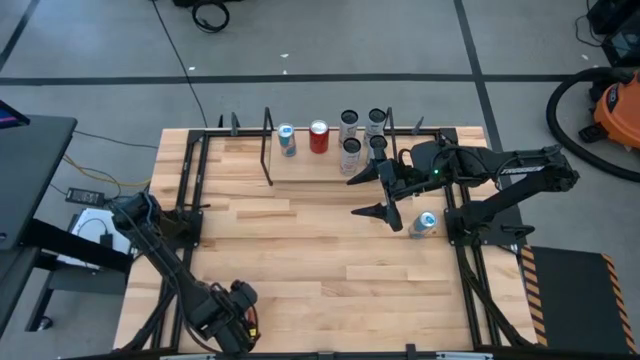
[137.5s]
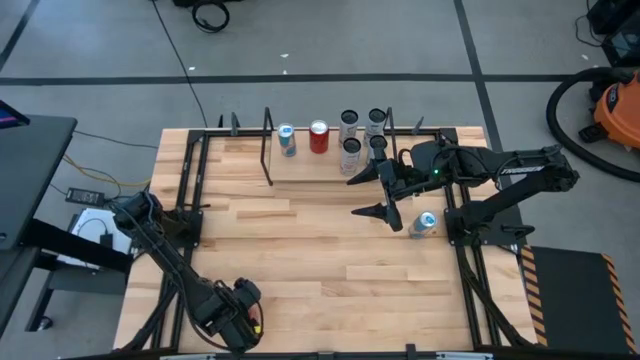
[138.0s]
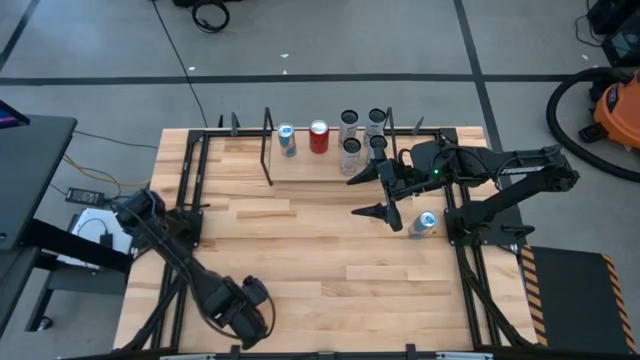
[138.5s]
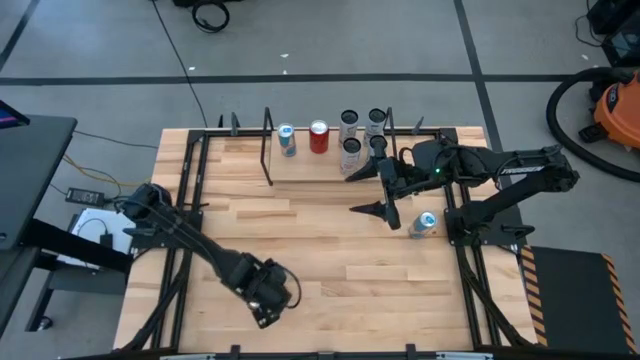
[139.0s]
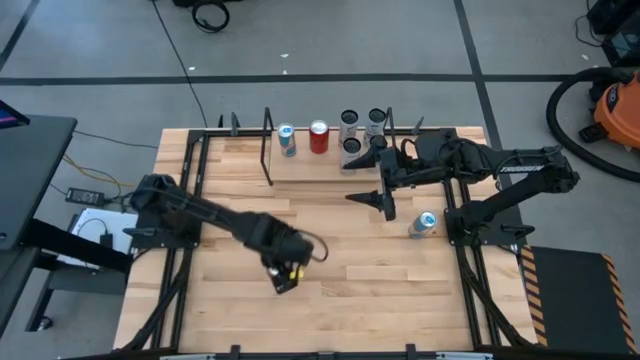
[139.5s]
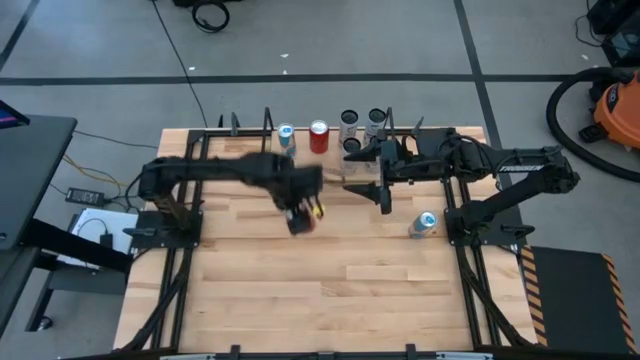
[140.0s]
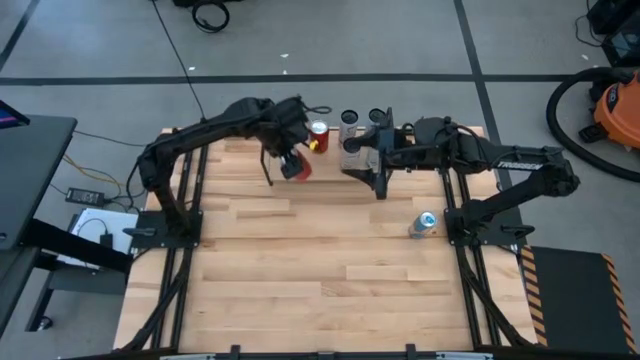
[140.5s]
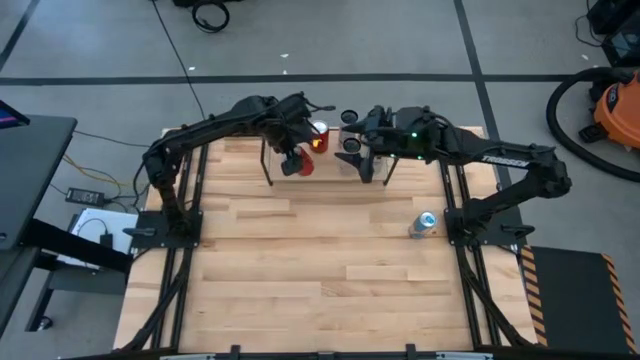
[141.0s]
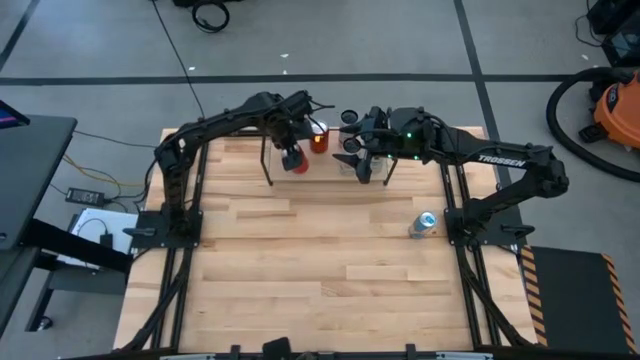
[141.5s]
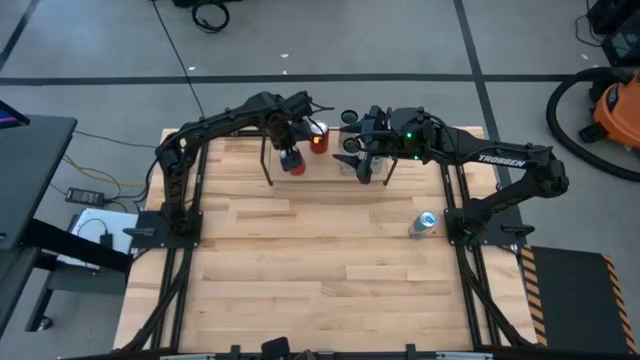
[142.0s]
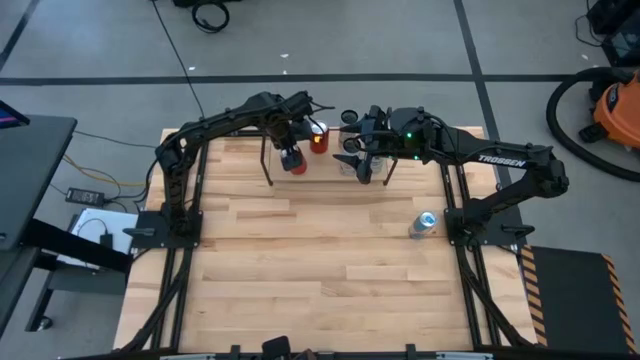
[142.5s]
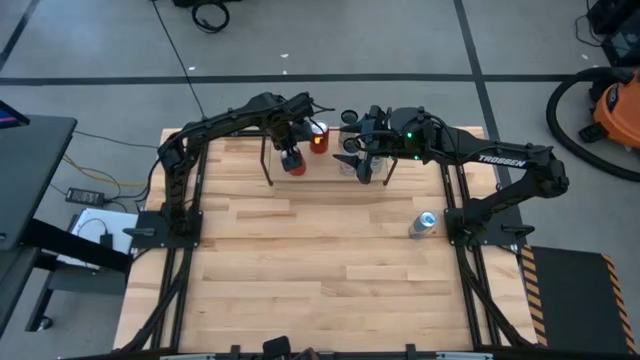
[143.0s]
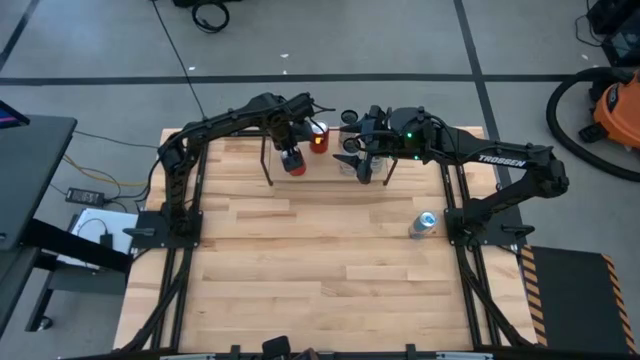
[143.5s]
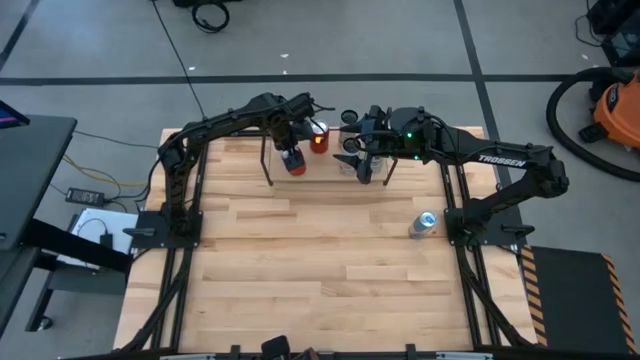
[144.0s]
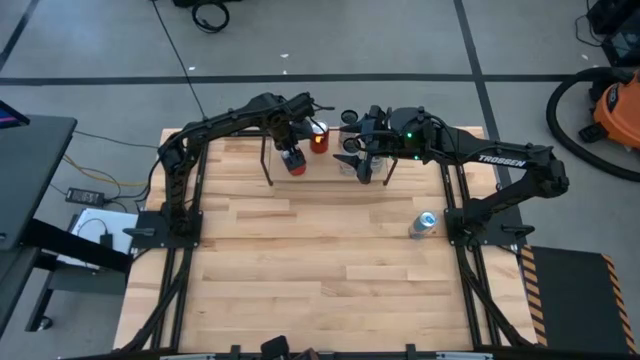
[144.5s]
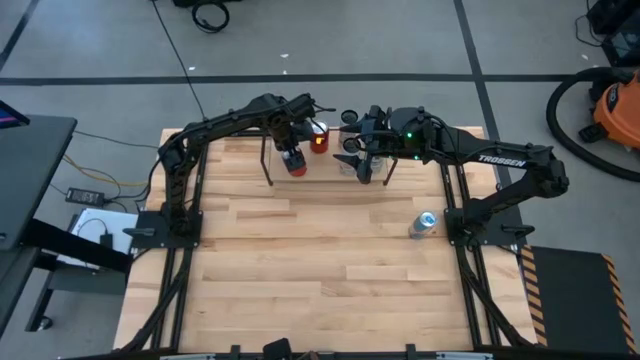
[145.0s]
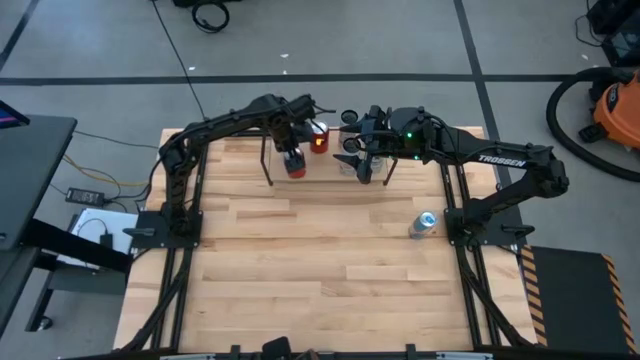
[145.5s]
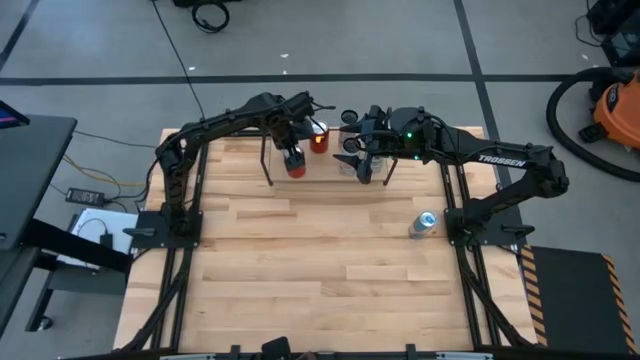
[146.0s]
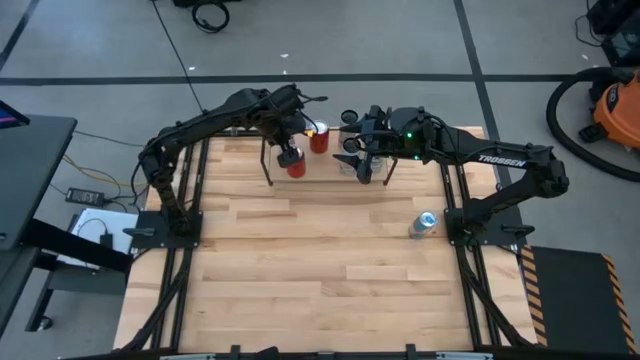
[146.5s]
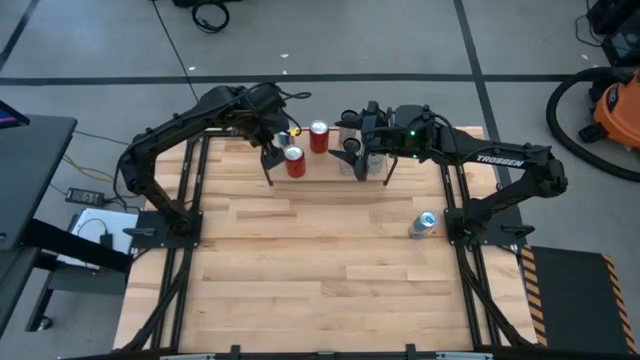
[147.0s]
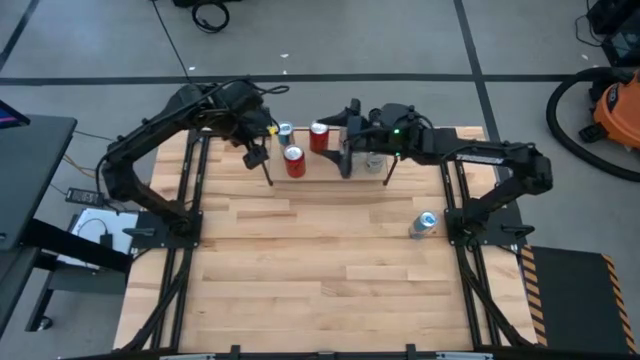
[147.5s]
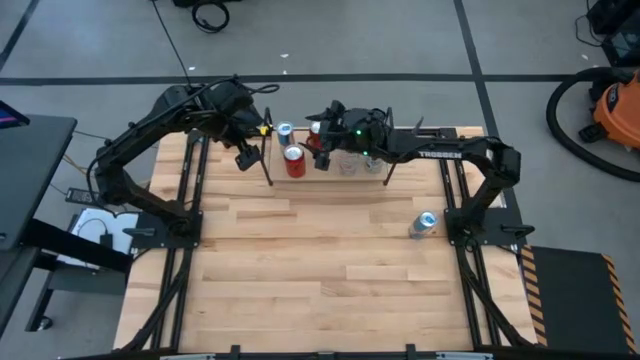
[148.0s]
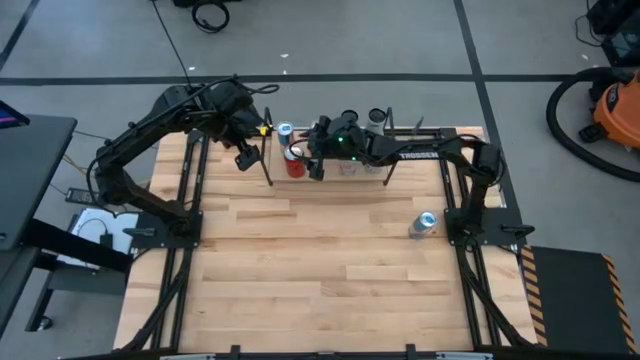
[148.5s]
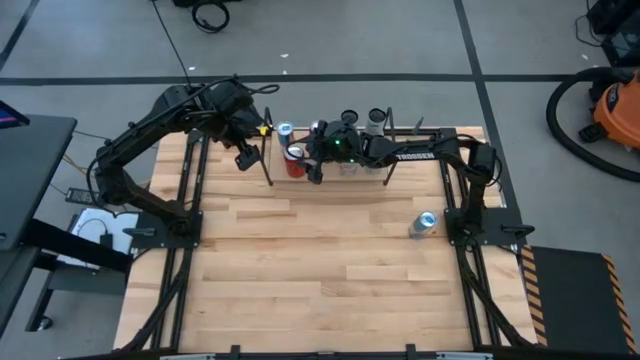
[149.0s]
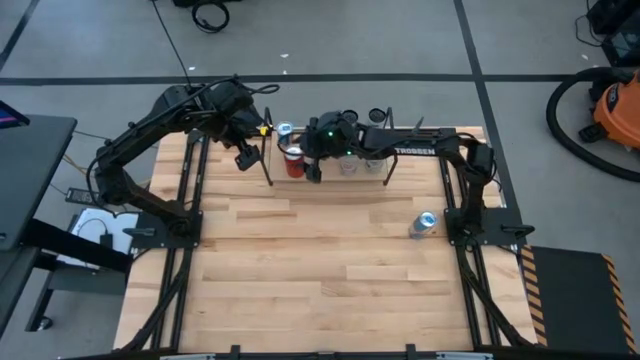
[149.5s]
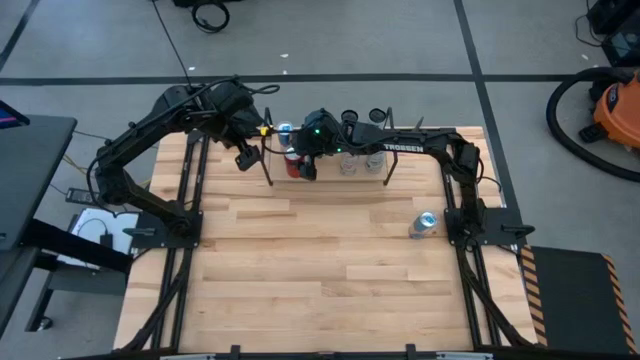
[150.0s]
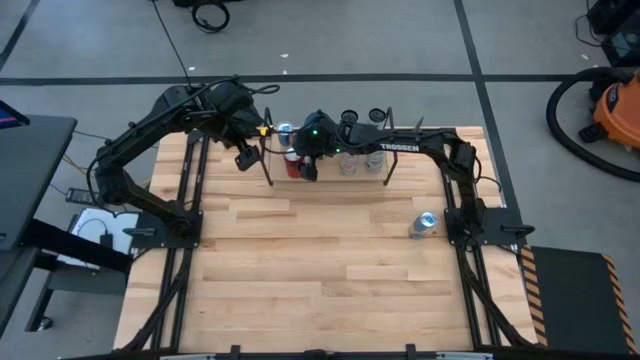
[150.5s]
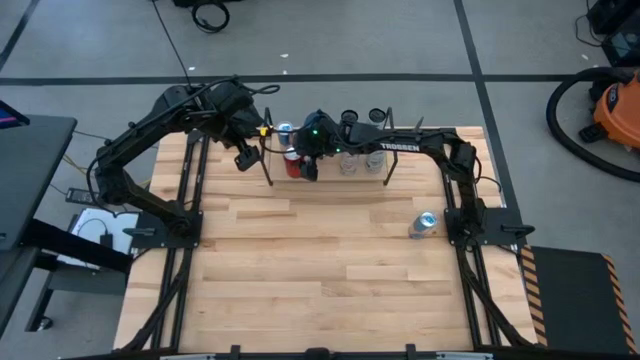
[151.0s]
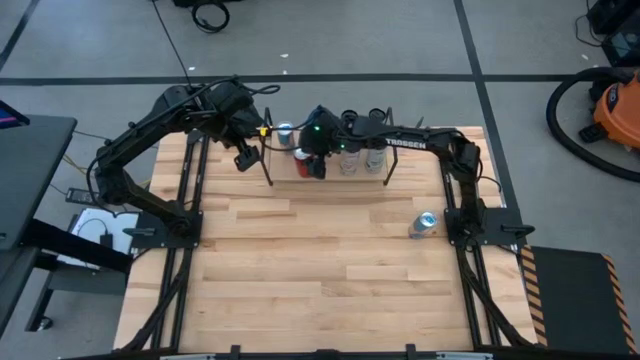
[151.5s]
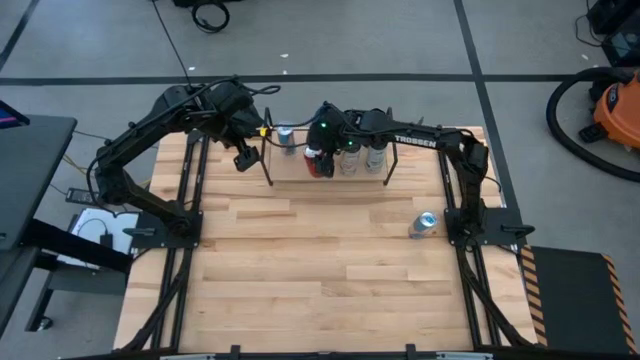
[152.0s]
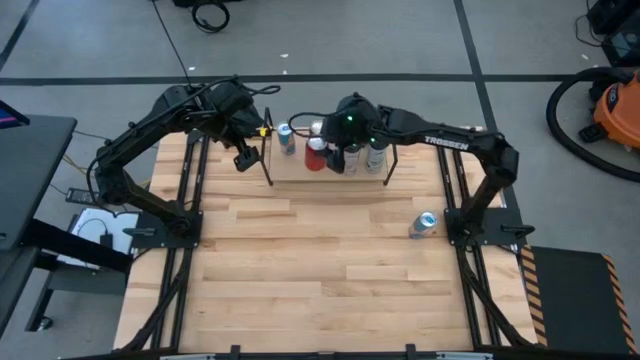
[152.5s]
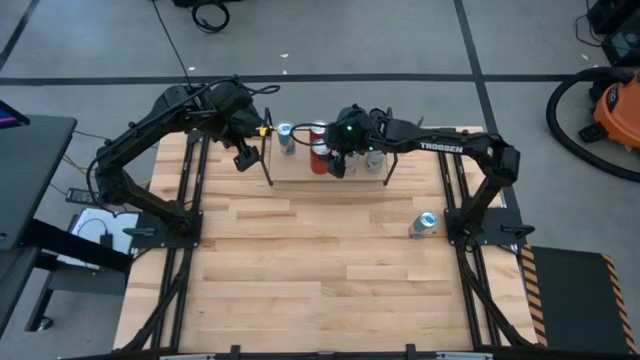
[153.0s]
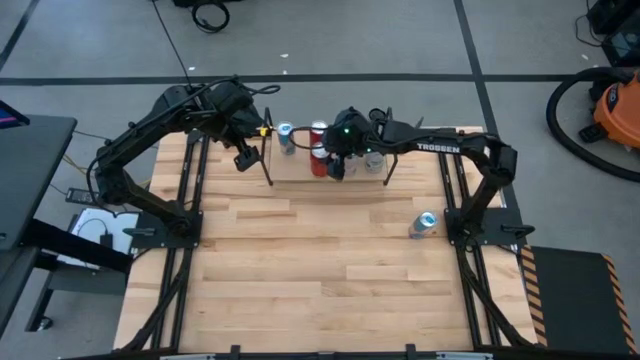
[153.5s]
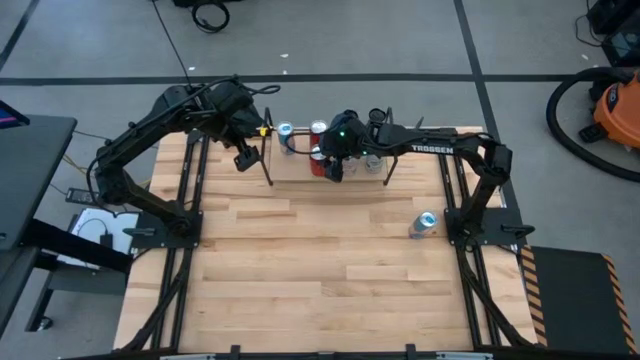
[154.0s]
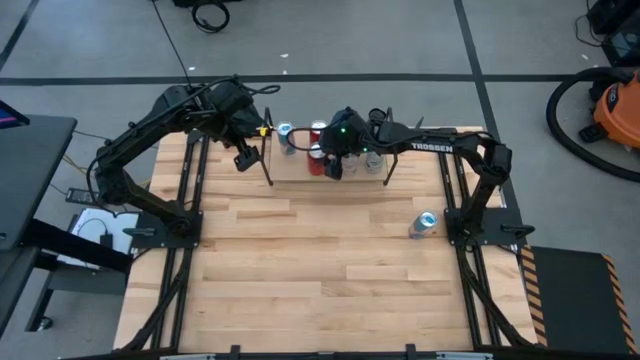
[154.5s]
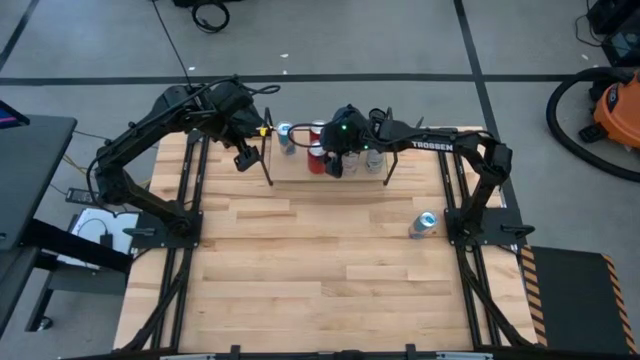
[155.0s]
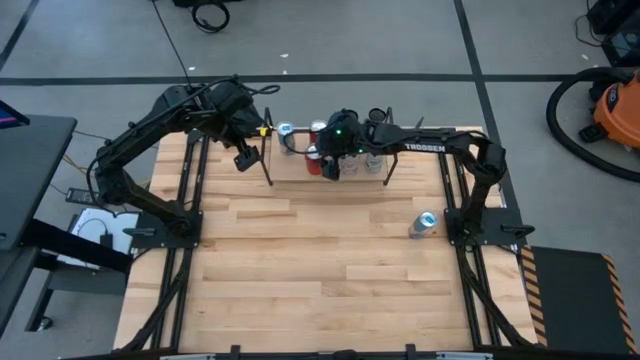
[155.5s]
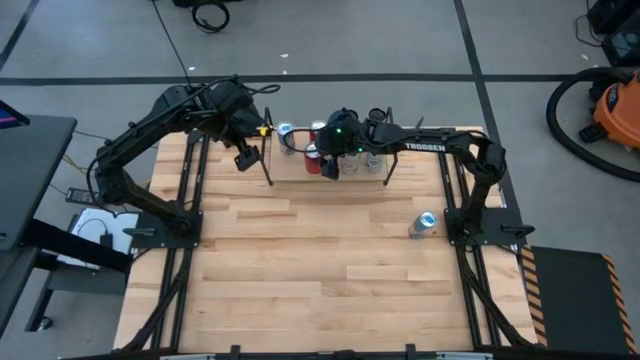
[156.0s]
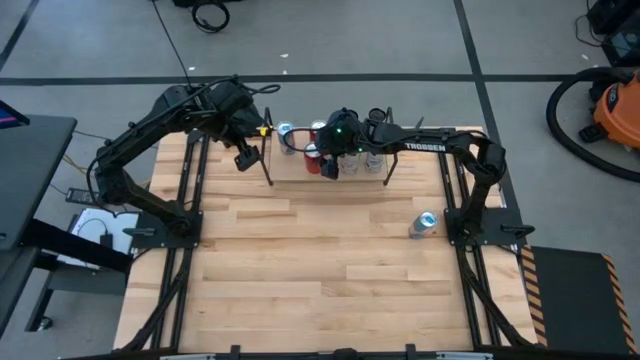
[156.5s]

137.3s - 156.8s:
Task: Place canned beverage on shelf
Put the red-black soda can on the shelf aligned with the other red-black soda can

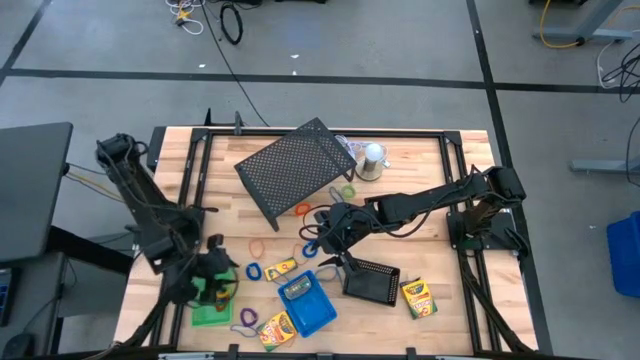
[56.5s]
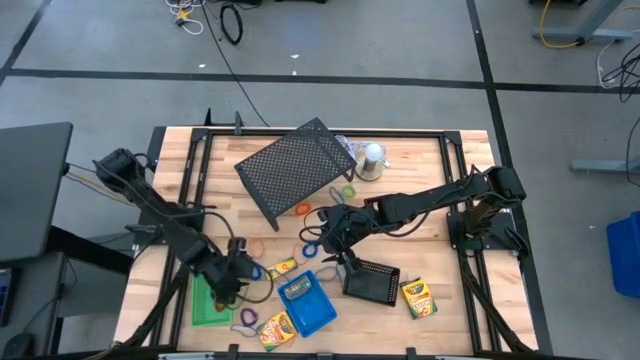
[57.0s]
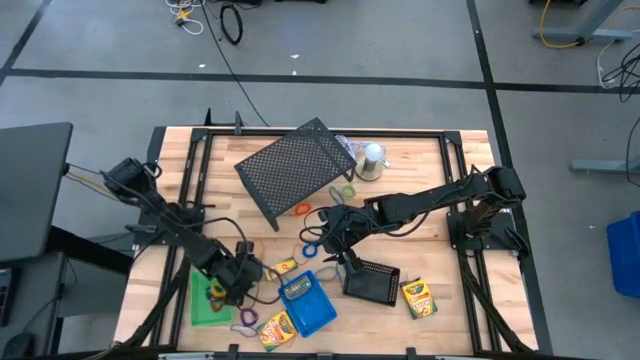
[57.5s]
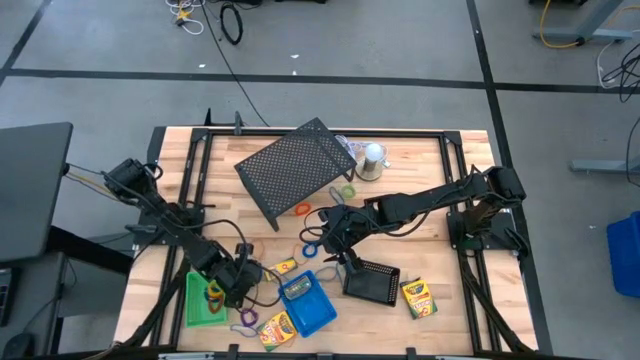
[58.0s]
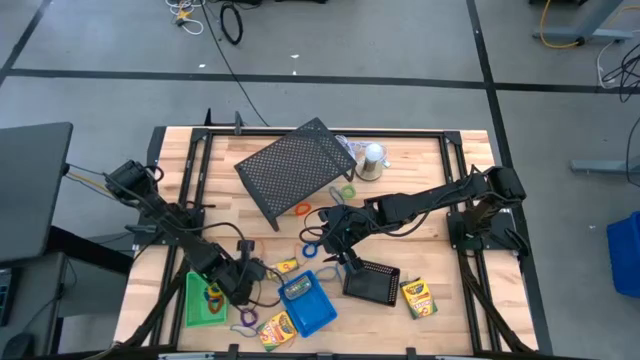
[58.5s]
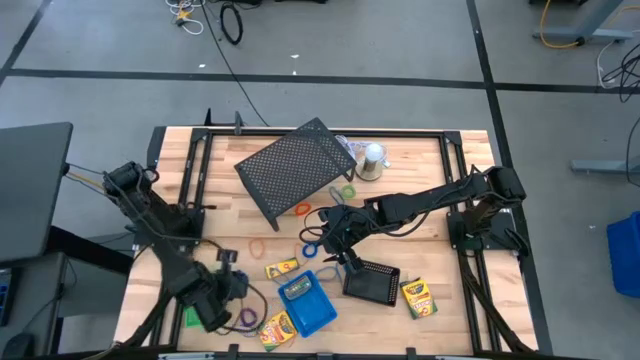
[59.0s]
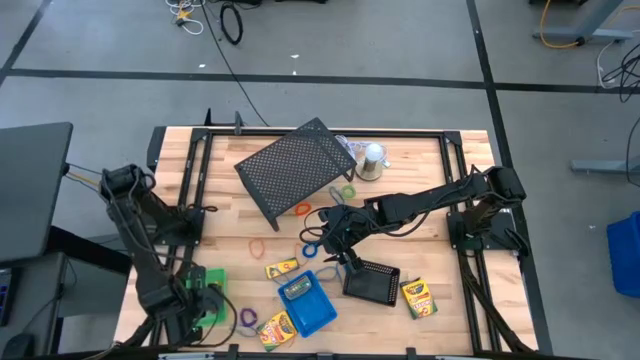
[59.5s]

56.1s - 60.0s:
Task: Pick & Place Office Desk Supplies
Put the blue spiral keychain into the green bin
